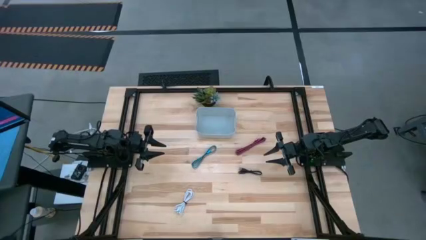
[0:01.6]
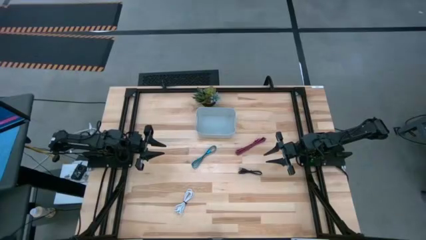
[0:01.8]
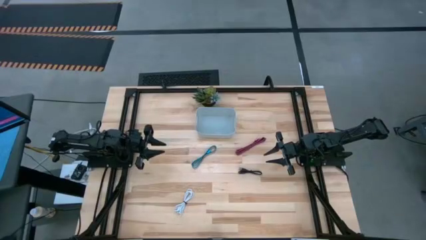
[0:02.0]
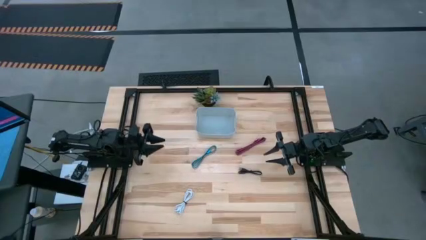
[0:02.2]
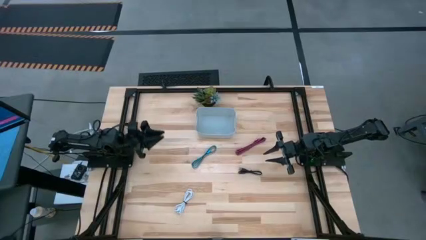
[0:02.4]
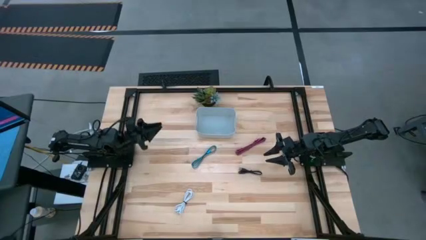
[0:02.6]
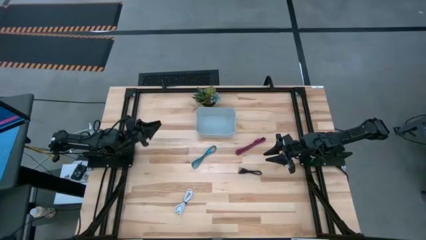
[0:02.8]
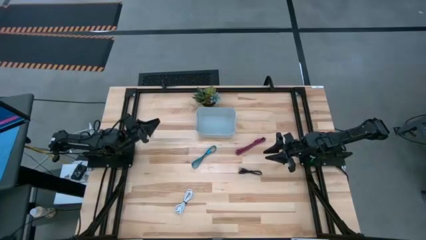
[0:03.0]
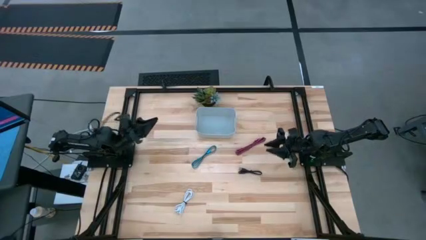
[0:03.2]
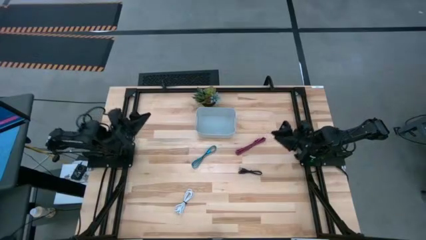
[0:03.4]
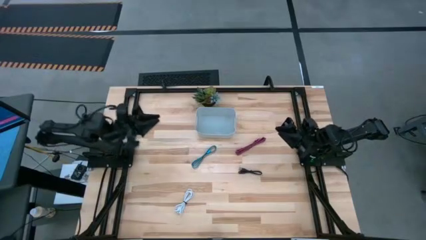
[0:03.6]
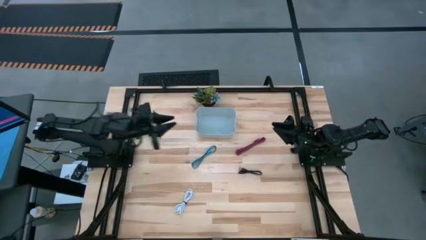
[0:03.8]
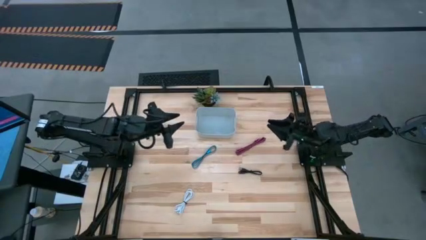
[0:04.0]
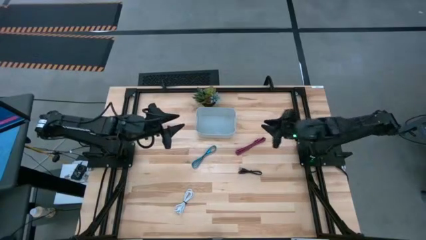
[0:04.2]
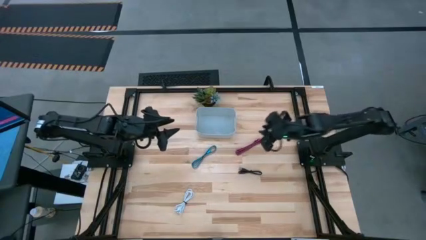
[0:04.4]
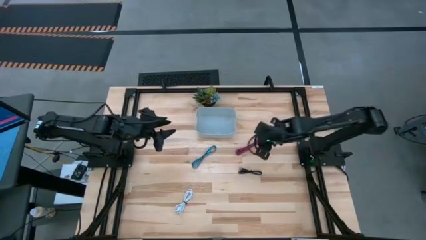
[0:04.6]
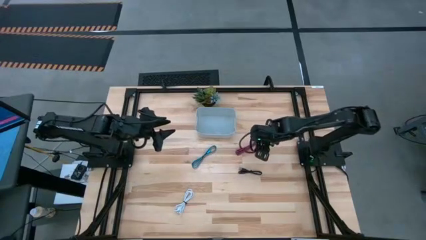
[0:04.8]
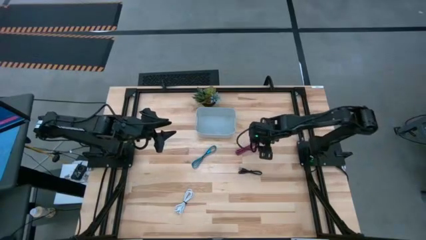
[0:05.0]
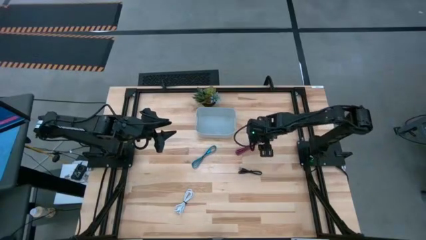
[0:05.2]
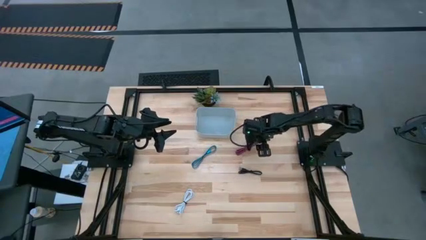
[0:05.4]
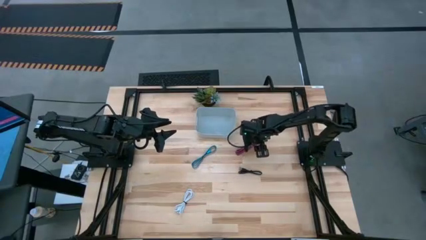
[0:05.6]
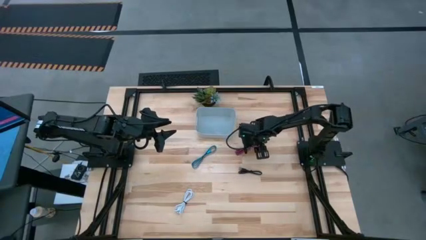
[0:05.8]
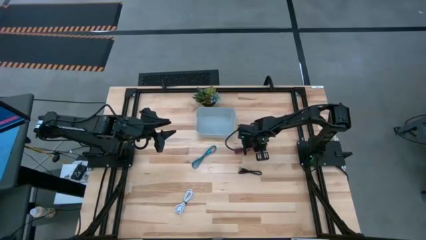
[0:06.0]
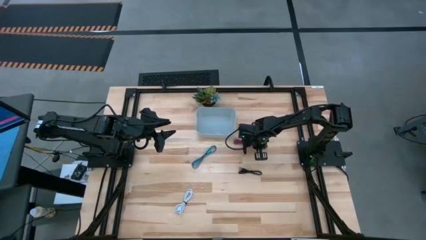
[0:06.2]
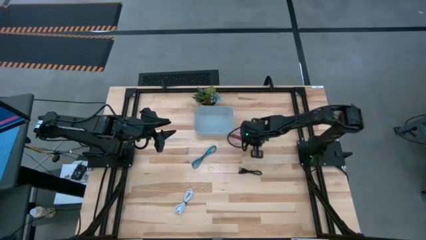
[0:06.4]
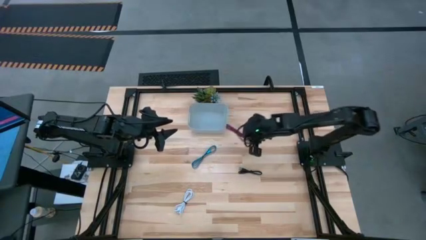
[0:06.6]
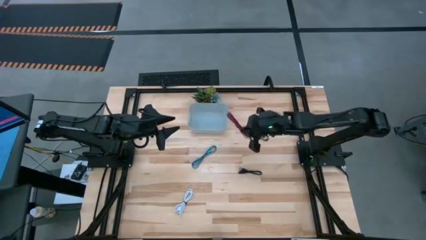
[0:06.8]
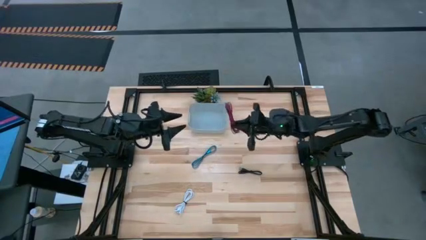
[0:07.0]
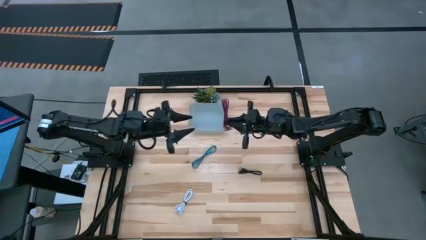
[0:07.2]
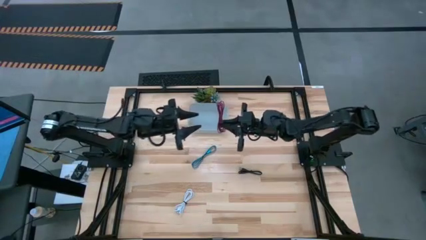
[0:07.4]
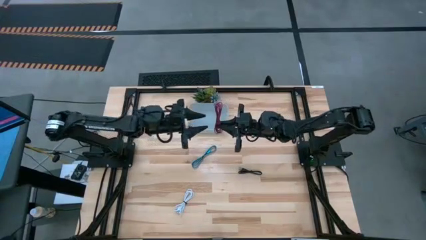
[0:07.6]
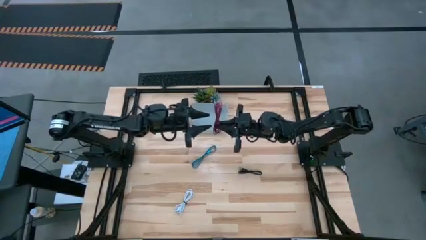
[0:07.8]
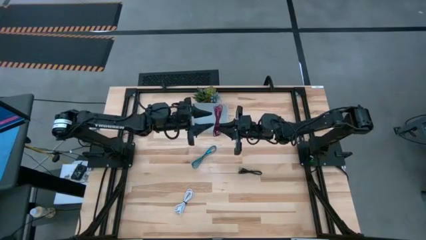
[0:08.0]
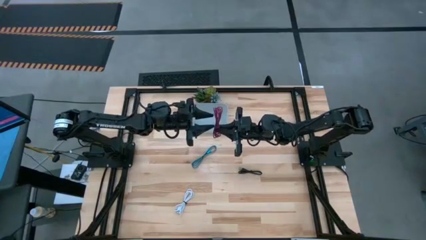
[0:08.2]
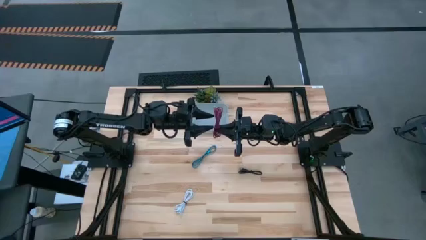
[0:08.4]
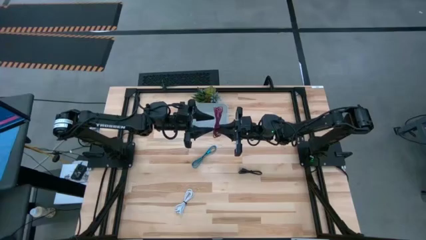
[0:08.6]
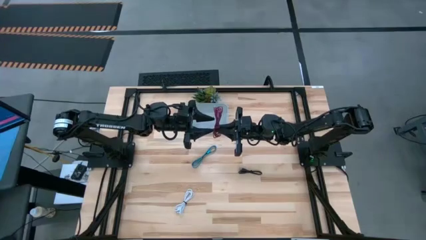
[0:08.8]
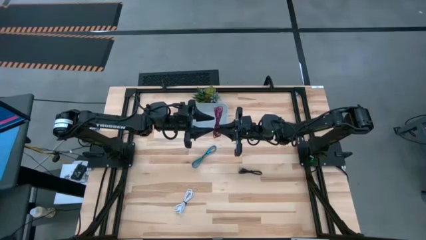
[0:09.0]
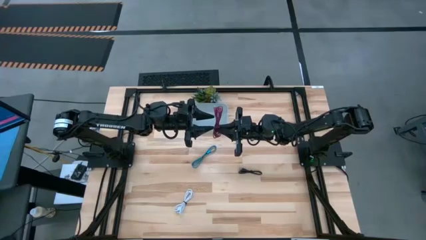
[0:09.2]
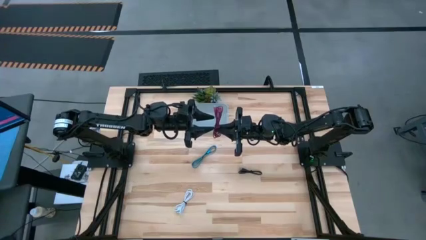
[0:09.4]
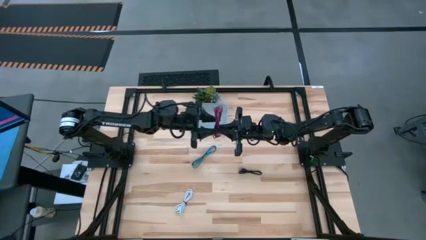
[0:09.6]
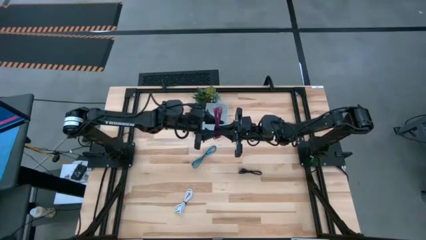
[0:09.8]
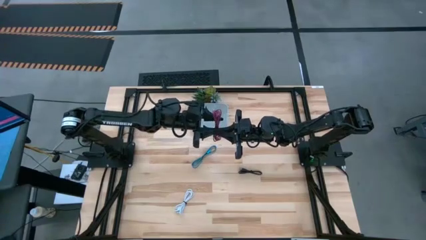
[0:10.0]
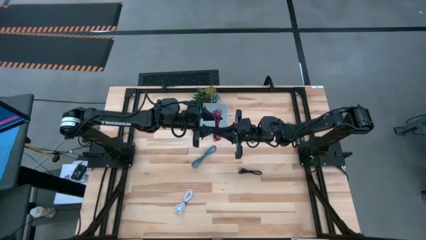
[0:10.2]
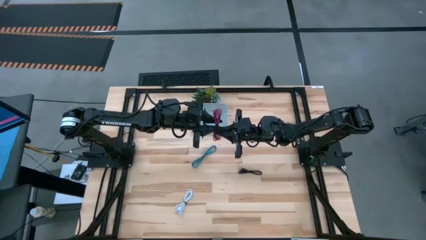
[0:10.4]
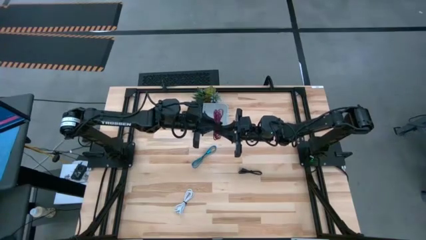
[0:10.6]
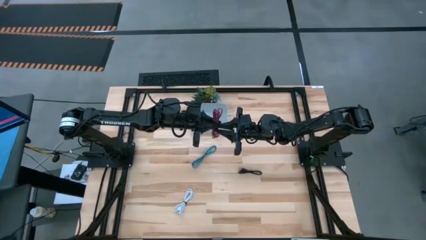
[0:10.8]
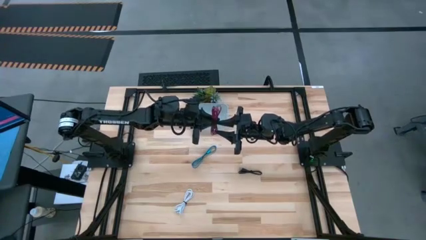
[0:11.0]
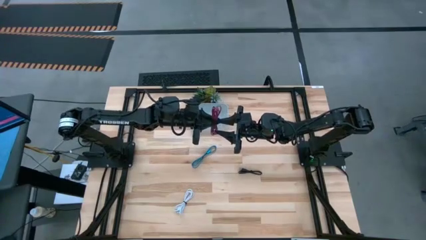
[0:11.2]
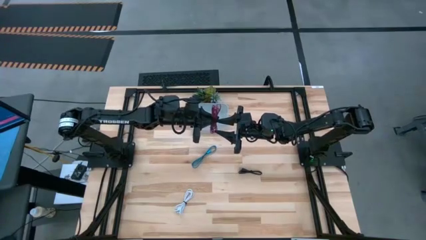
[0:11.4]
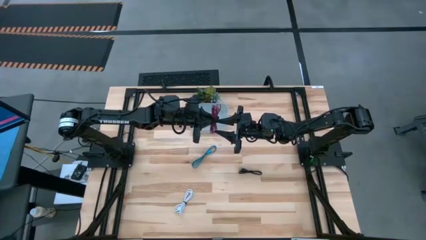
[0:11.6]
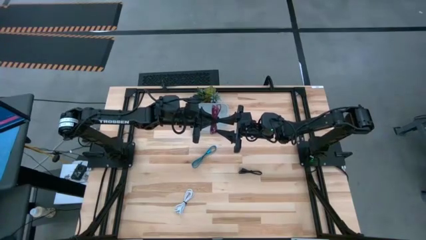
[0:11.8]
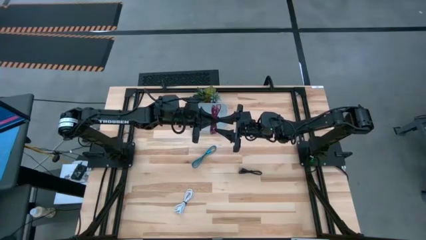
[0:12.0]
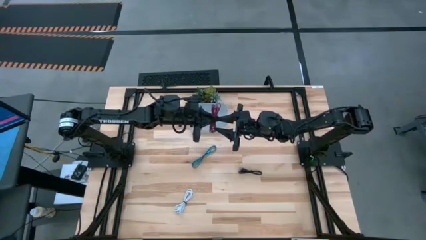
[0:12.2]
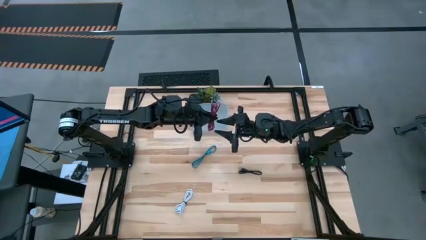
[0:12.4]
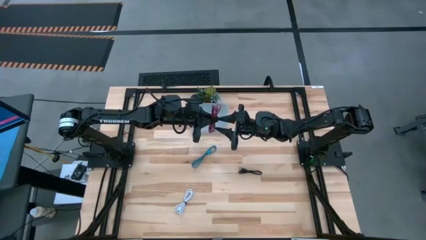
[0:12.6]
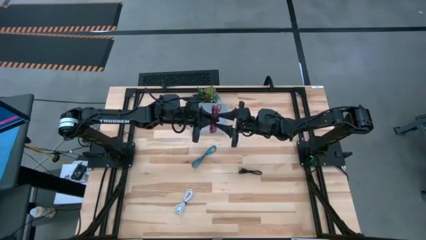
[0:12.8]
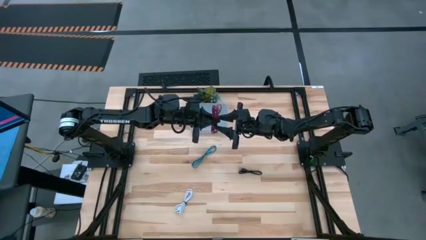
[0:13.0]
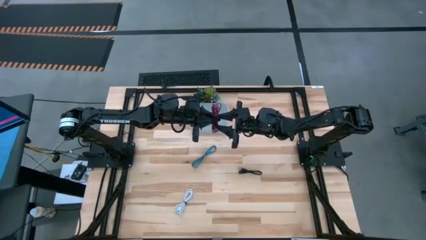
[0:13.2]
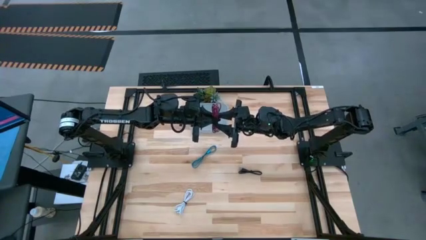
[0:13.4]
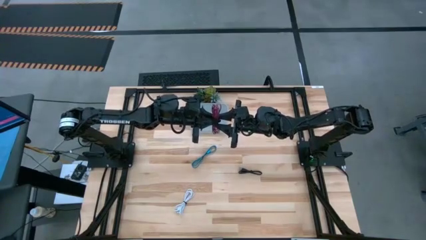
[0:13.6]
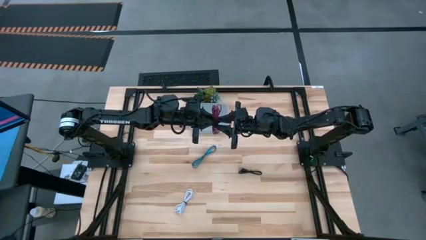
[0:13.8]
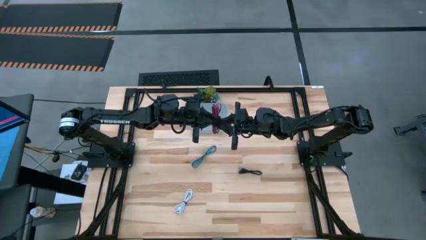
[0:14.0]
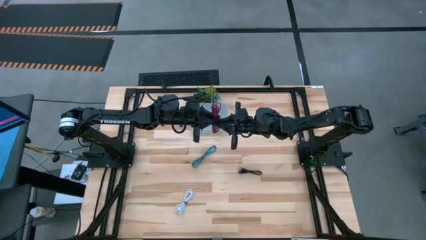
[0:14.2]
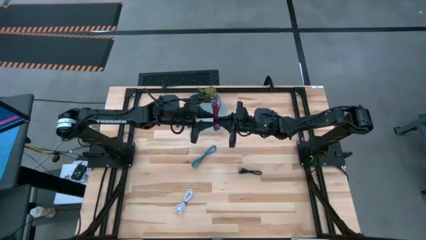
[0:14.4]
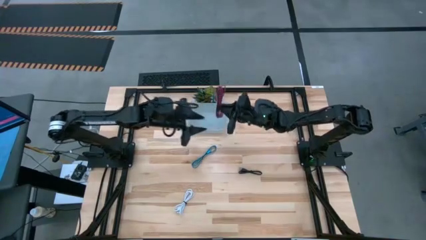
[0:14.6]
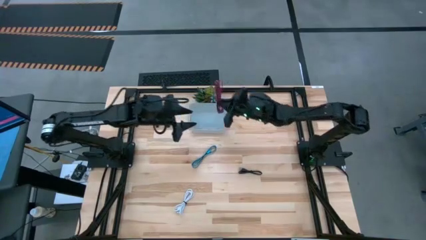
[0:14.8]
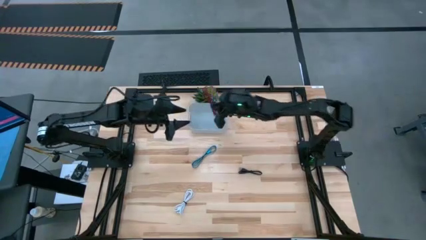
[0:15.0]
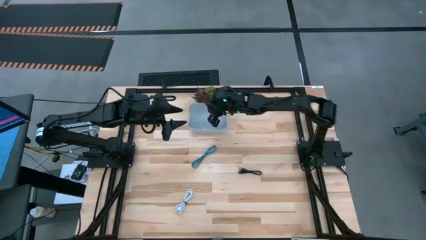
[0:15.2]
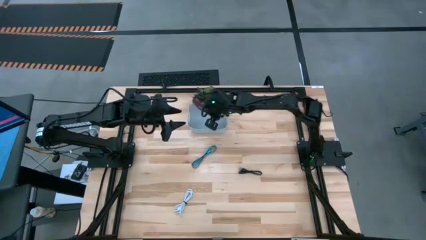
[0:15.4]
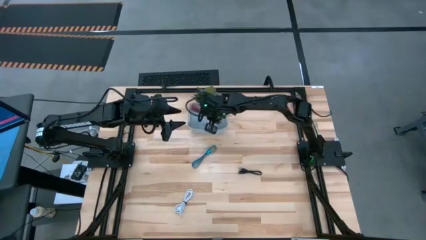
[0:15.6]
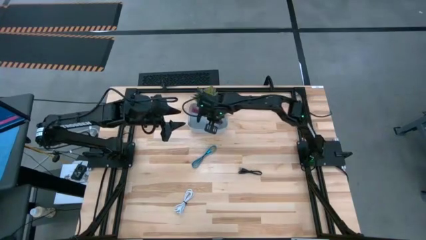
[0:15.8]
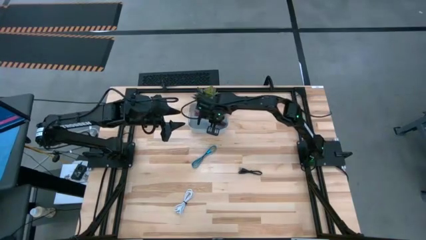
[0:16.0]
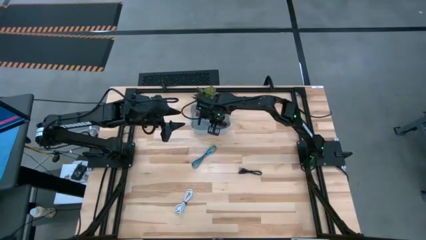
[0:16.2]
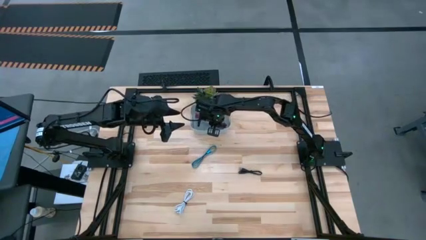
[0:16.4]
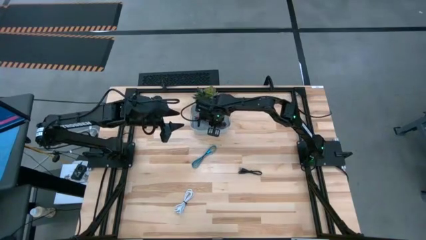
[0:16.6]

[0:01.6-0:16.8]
Task: Pick and place USB-C Cables
Put the pink charger cable into the gray bin
